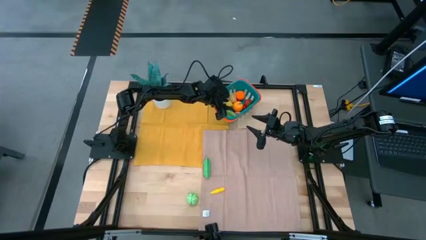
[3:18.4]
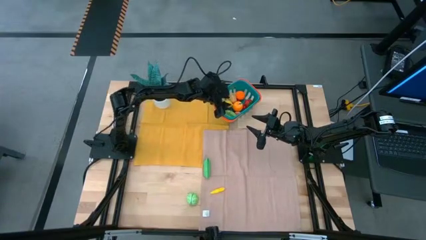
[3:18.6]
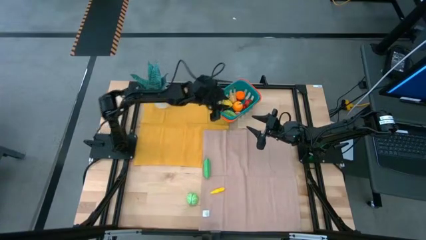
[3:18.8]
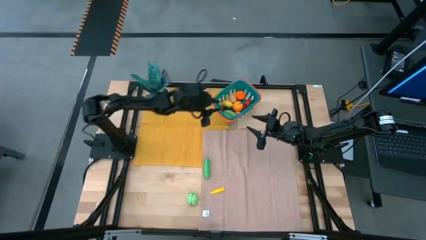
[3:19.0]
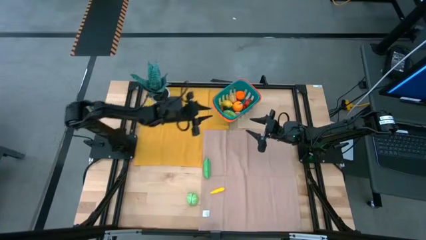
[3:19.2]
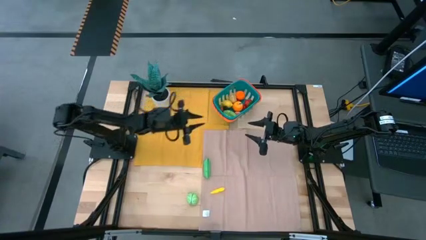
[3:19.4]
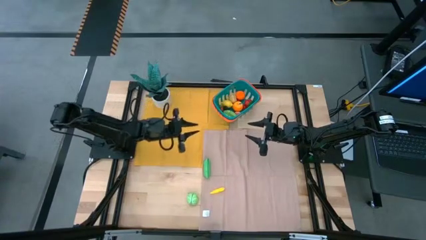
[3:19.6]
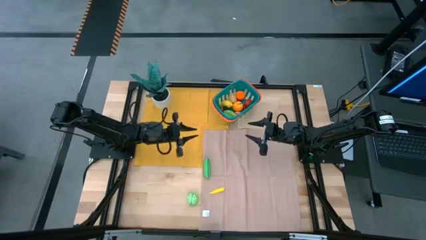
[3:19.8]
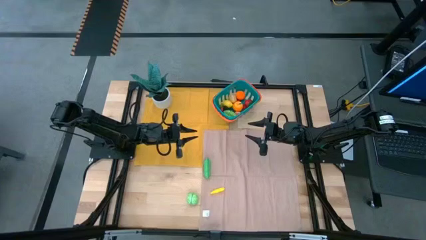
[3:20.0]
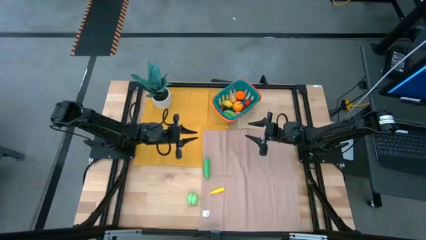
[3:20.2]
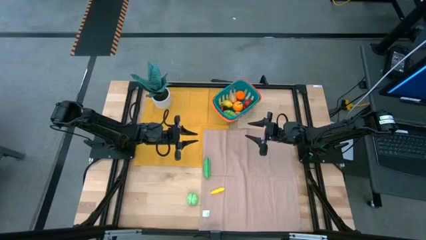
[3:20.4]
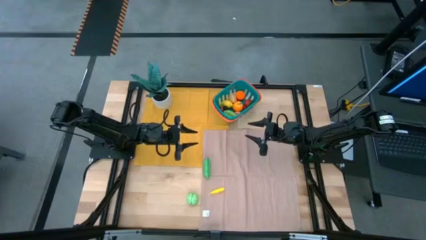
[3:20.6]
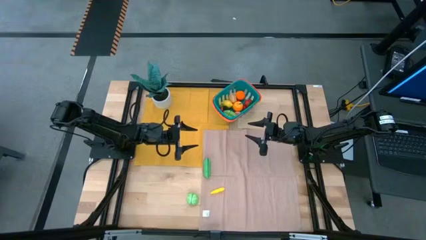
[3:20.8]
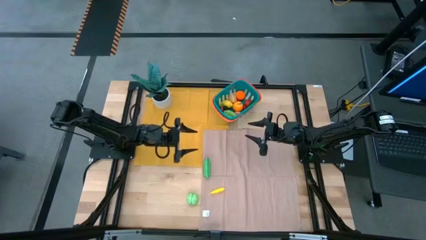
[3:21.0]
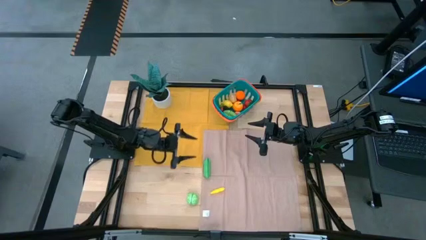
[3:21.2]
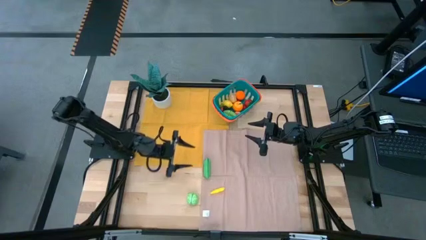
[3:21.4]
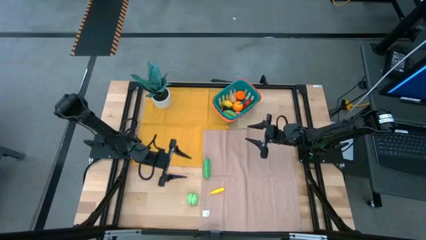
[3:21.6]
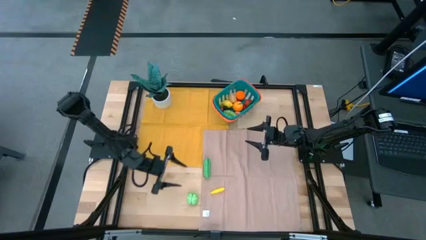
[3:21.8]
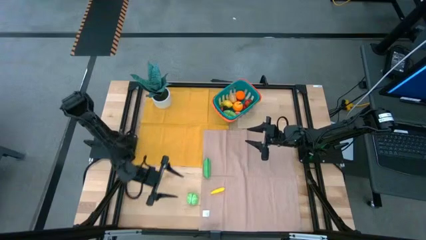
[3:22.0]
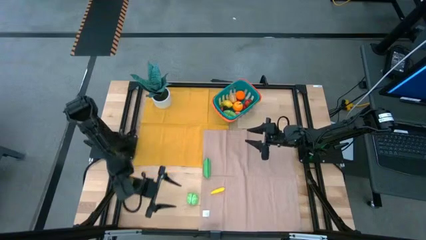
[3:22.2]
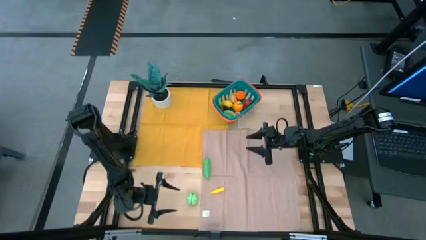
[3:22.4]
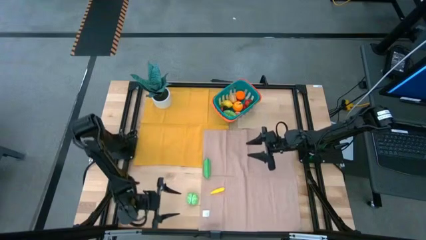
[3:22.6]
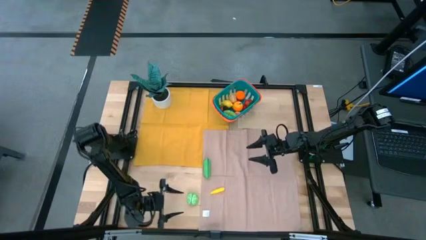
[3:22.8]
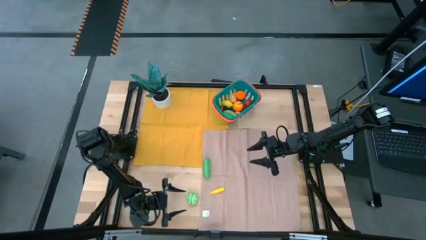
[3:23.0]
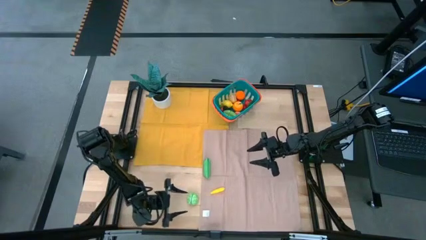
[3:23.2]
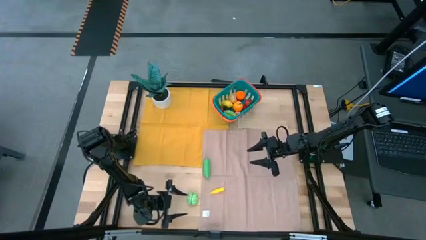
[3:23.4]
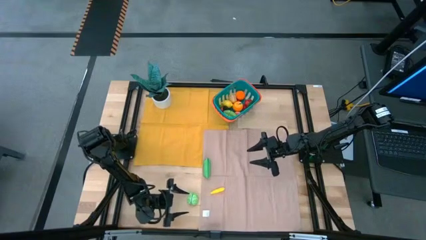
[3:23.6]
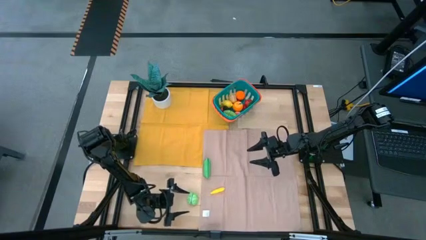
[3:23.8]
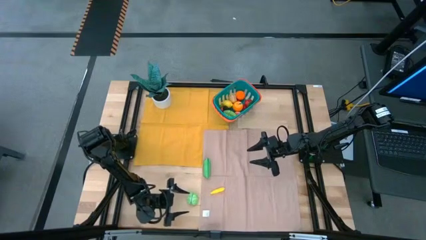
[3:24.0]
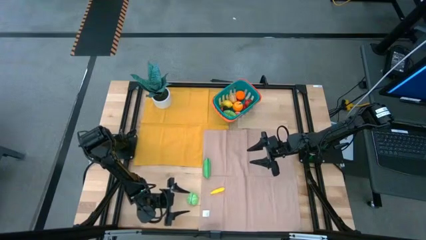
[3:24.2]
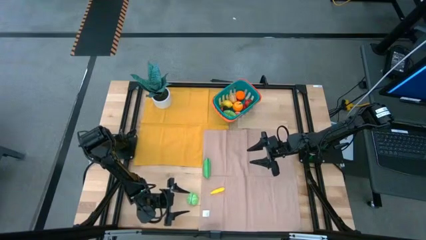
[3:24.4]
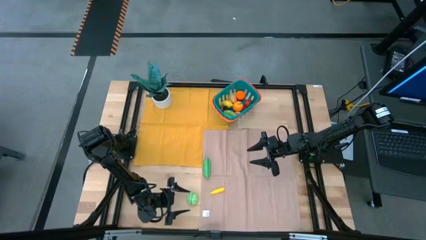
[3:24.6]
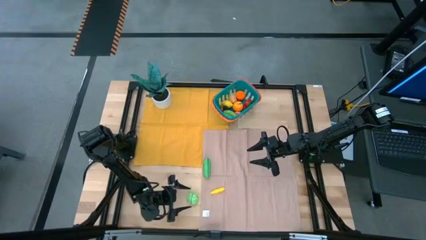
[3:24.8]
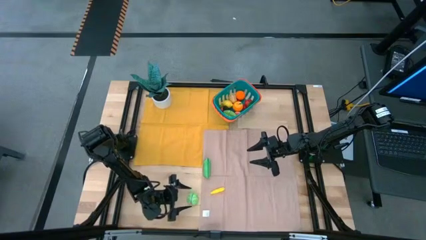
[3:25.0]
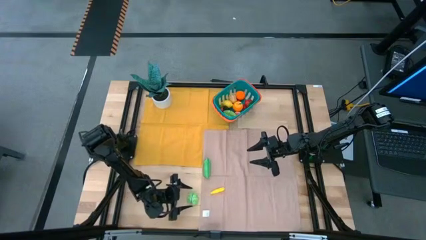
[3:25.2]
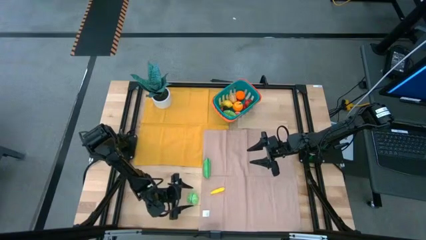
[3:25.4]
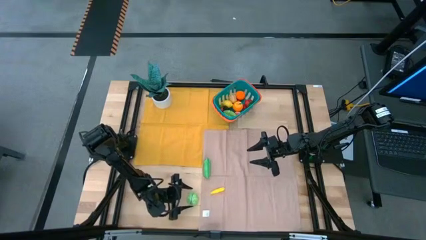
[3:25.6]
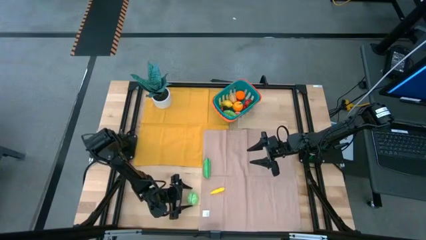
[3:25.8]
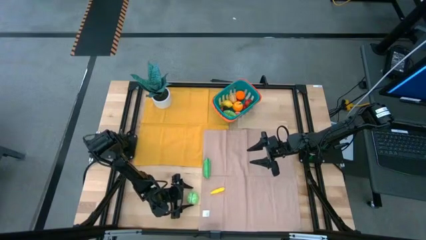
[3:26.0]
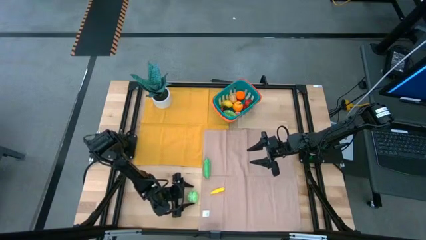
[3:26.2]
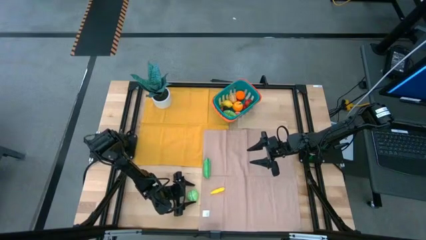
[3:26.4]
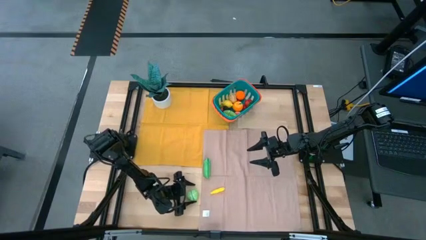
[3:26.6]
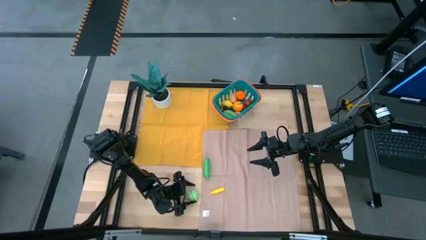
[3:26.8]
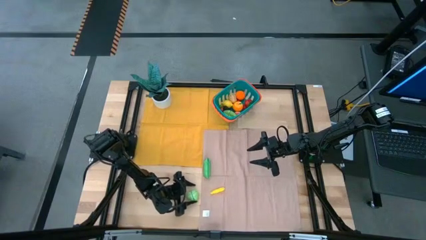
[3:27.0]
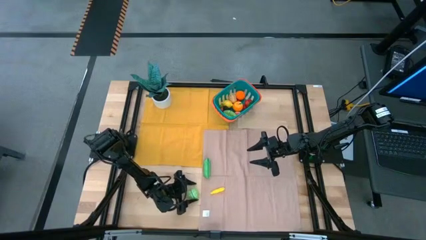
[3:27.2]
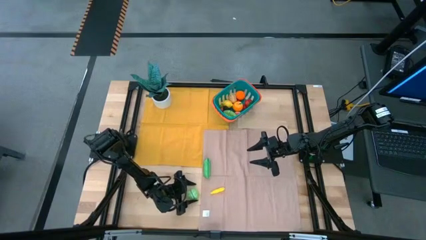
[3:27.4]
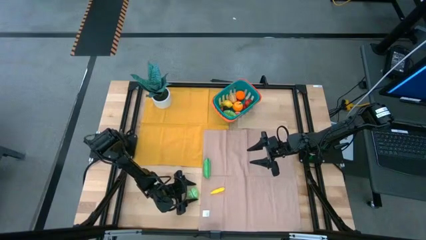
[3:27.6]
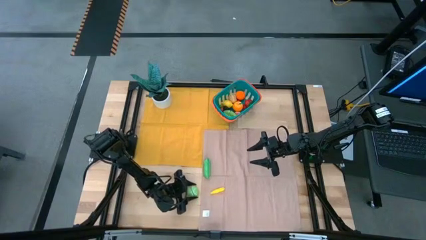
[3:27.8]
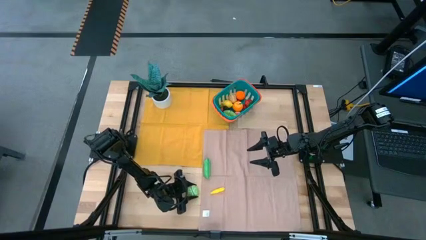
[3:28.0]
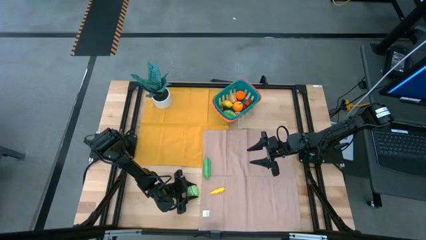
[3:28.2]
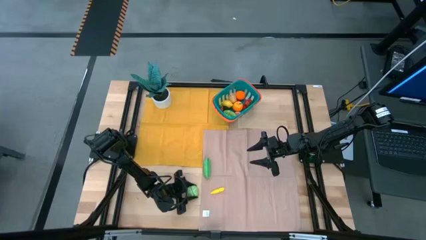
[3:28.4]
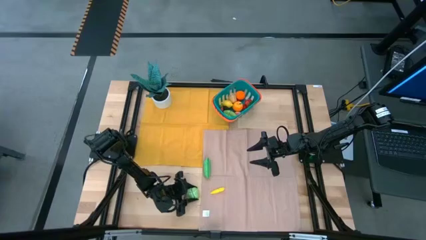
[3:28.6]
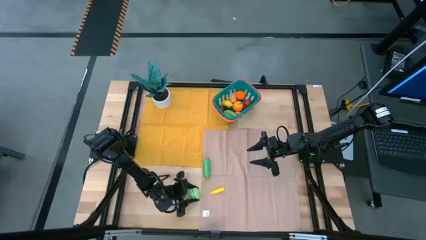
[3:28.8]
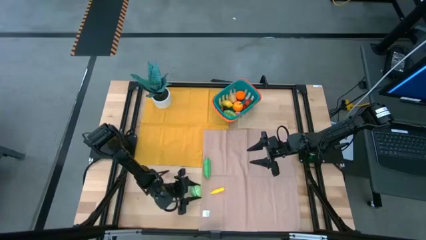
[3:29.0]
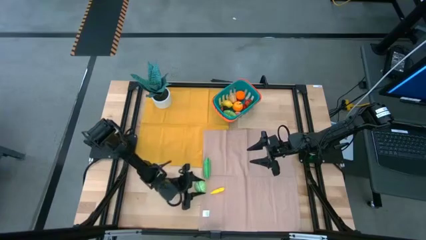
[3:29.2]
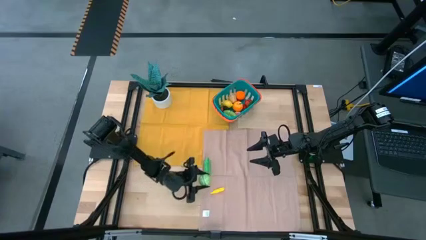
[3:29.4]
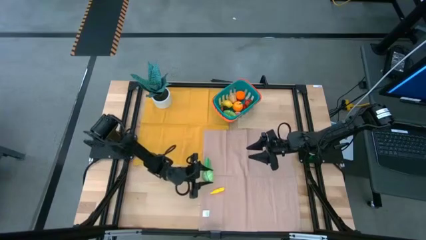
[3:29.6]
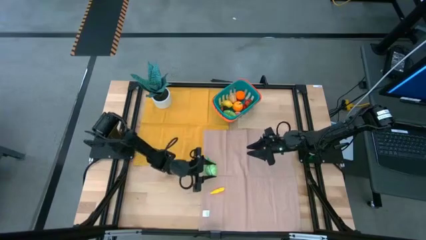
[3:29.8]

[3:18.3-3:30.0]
Task: Pick and placing Produce into tupperware
Put the cabbage into the basket

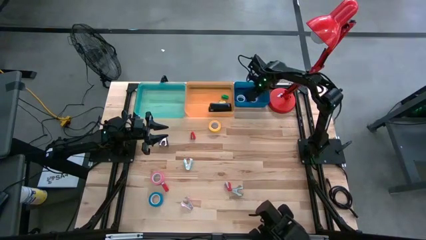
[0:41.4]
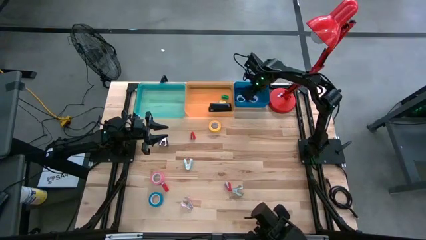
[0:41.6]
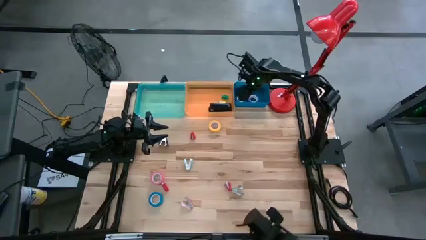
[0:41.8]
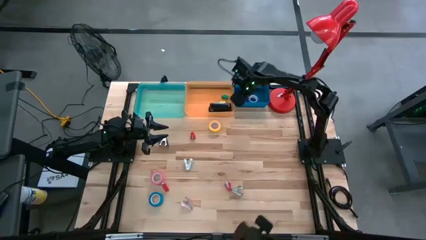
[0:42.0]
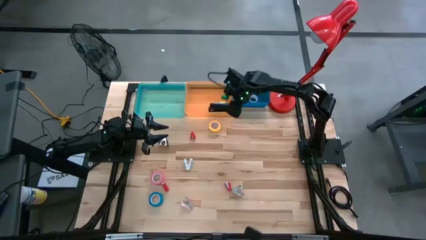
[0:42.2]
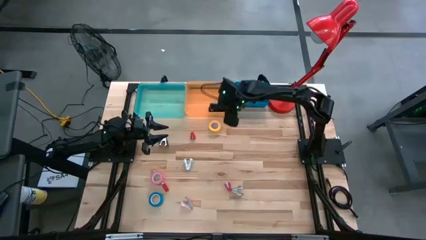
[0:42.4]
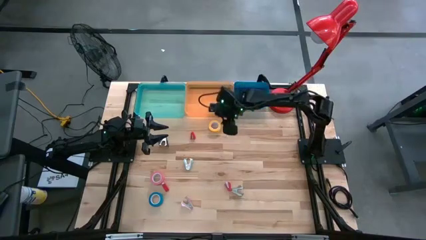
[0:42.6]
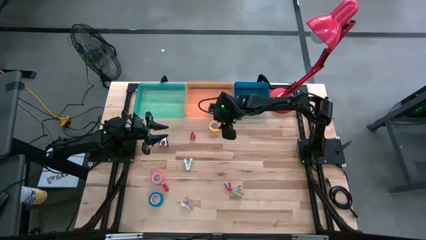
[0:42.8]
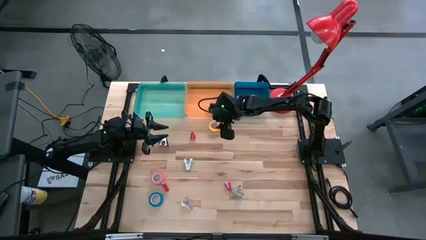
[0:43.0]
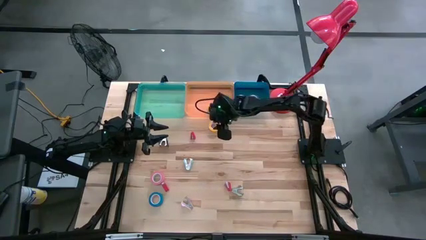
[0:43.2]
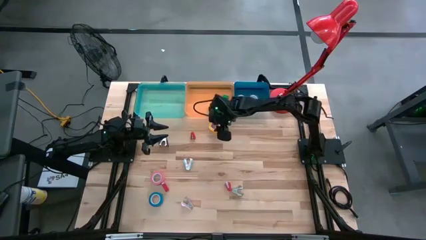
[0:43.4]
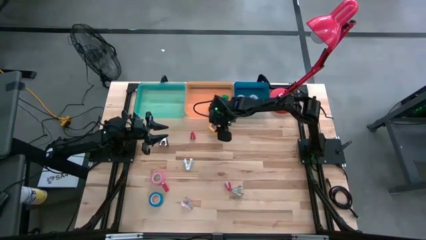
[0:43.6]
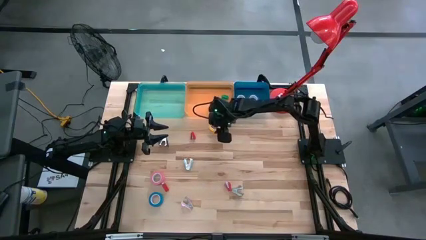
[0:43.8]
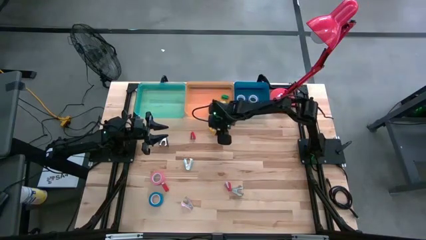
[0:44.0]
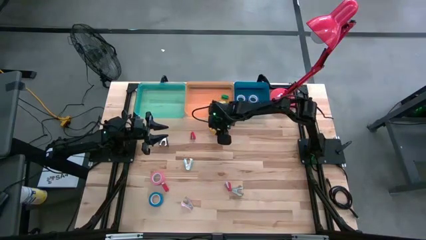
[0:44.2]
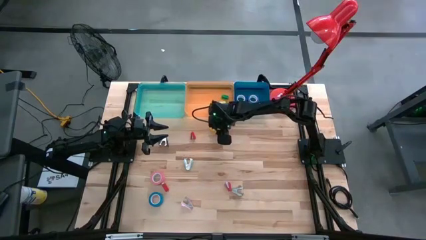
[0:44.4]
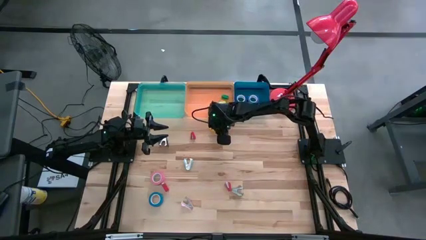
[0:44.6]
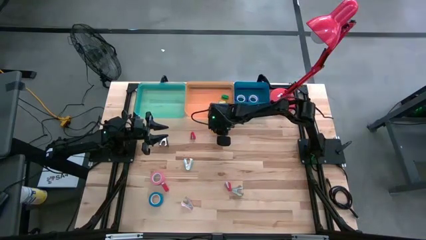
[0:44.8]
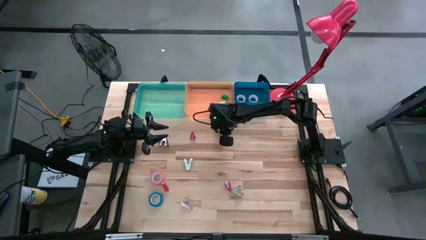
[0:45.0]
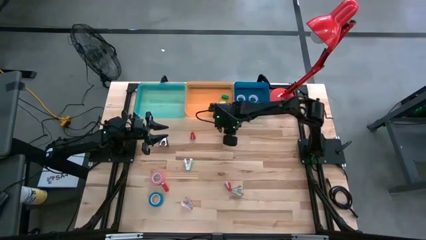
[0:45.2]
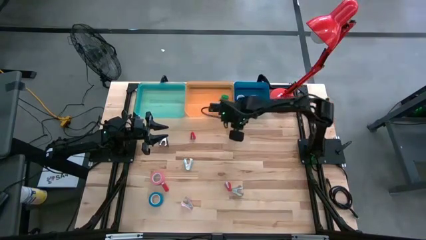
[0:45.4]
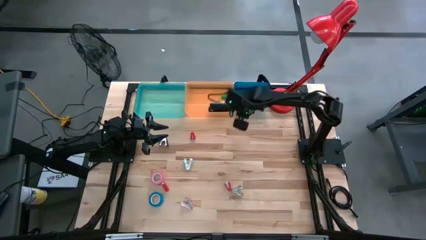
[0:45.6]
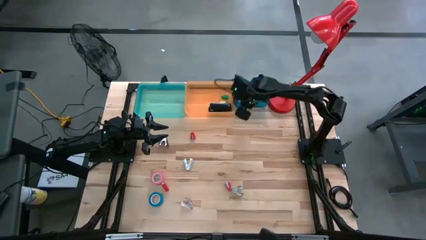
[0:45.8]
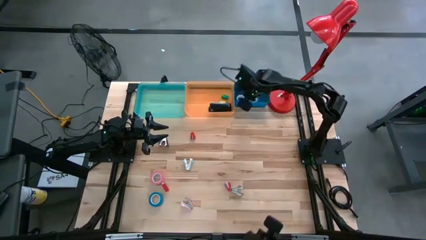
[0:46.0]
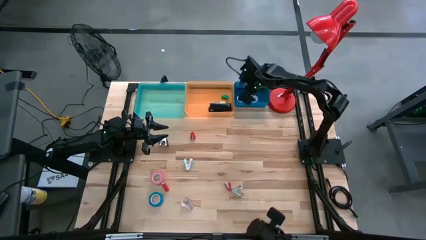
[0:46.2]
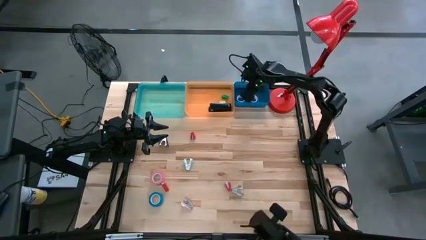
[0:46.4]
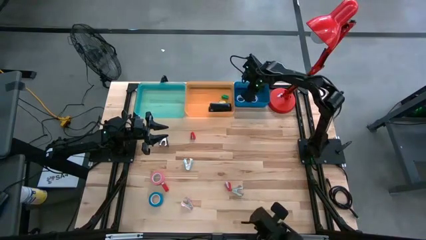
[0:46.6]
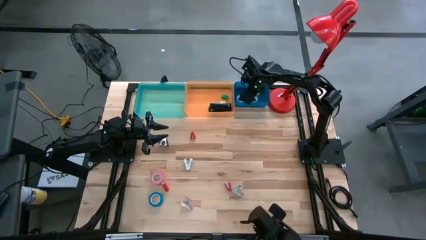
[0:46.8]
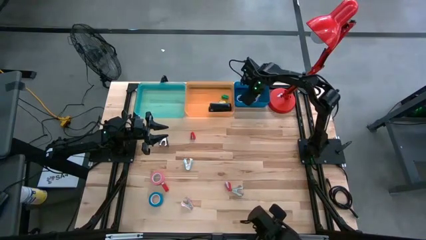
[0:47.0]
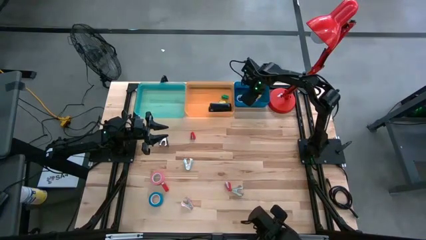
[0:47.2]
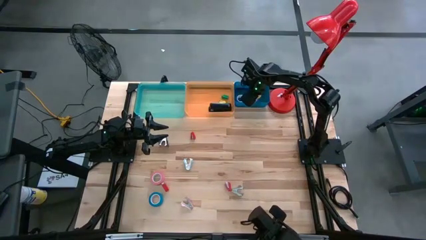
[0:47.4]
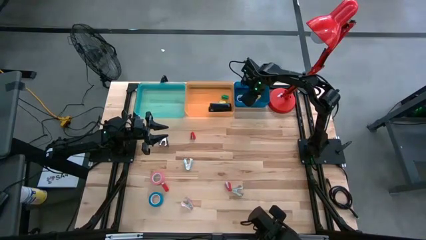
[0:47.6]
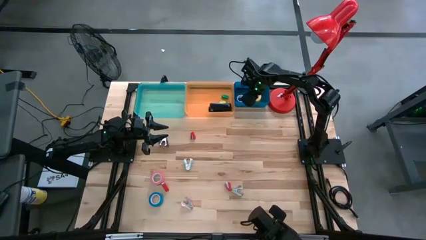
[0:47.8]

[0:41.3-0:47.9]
Task: Pick and place Stapler, Stapler remover, tape
Put the yellow tape into the blue bin
